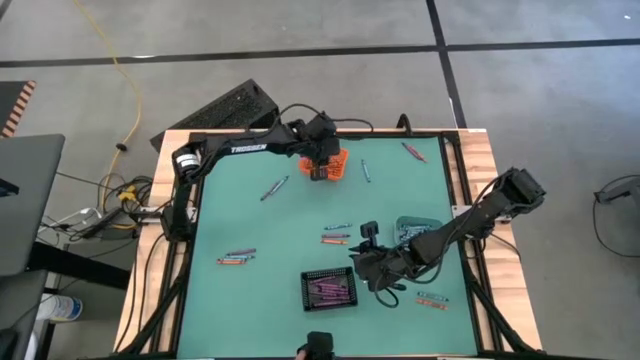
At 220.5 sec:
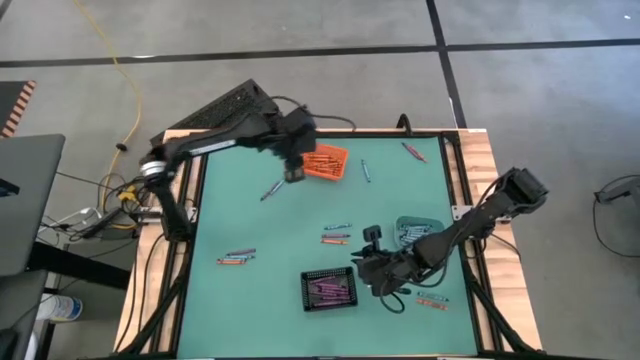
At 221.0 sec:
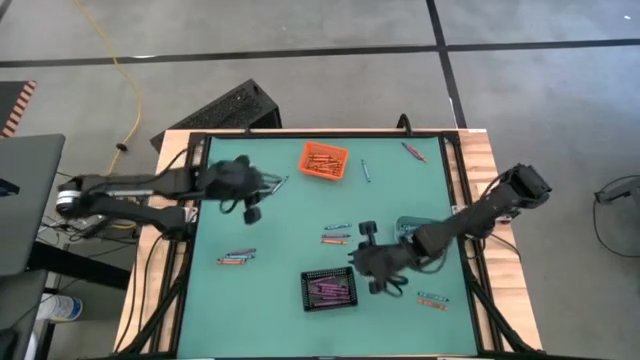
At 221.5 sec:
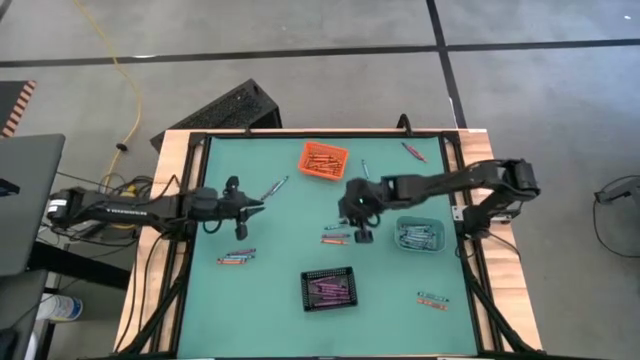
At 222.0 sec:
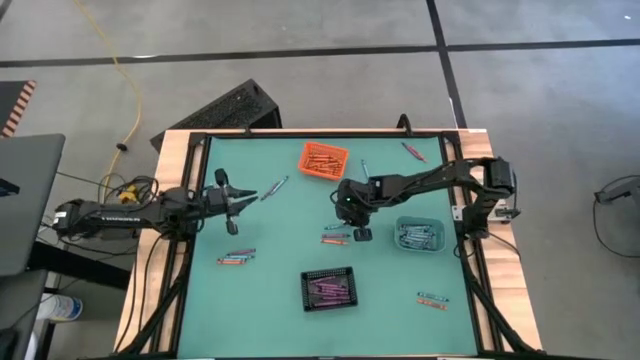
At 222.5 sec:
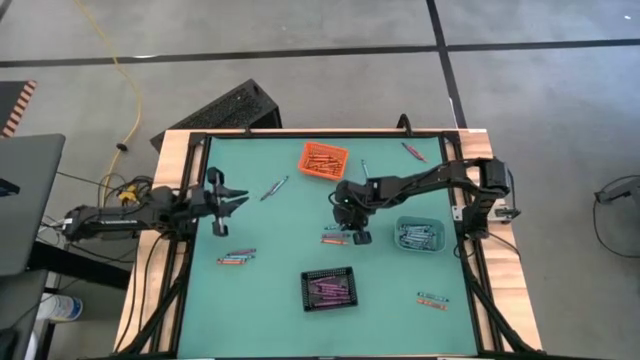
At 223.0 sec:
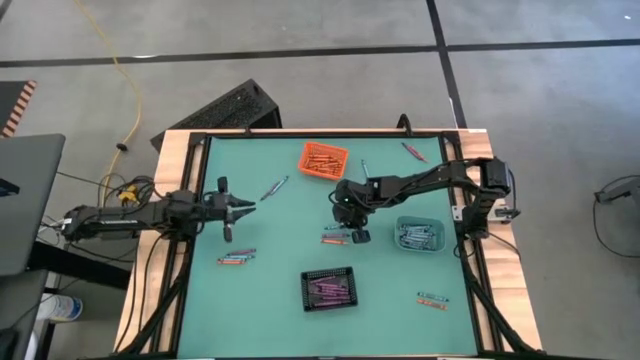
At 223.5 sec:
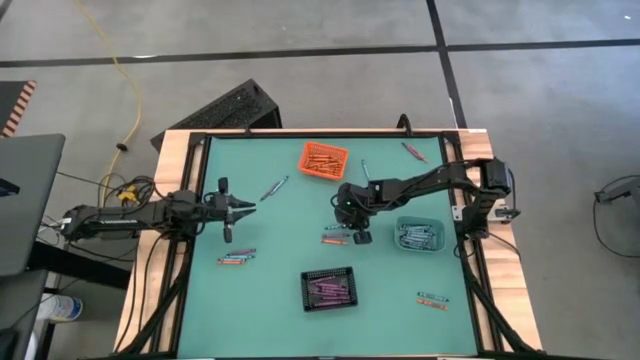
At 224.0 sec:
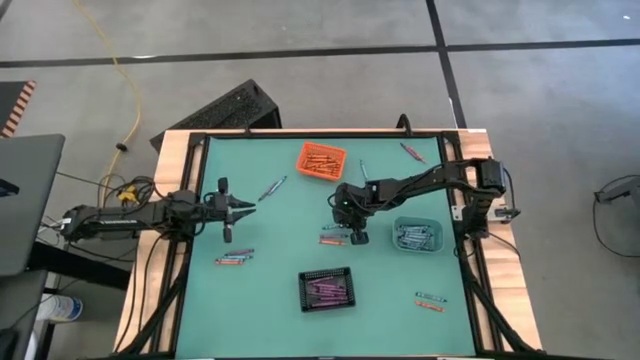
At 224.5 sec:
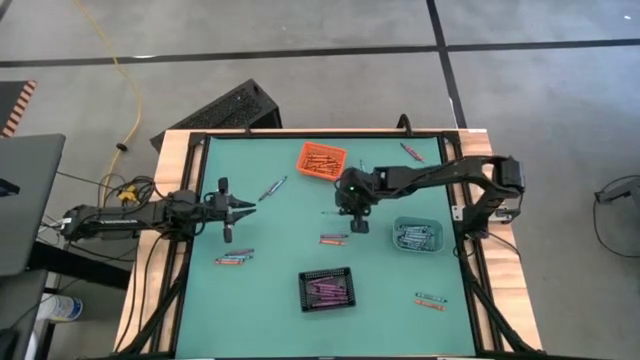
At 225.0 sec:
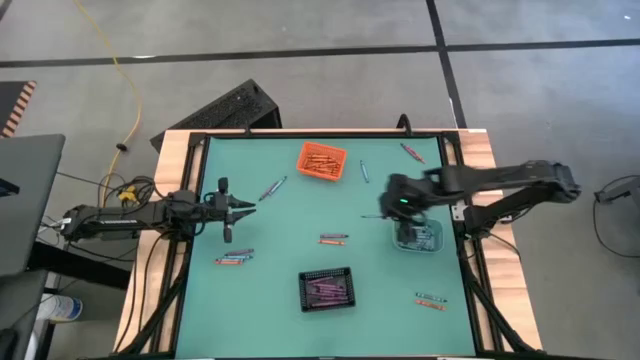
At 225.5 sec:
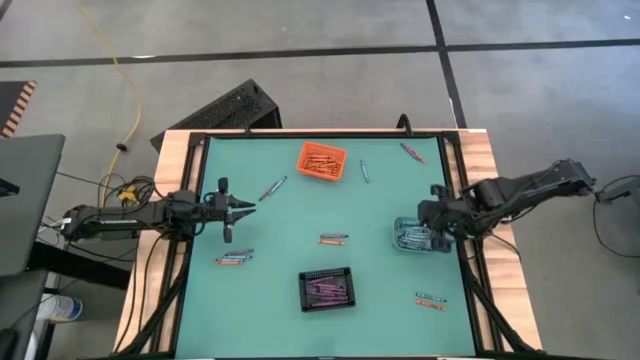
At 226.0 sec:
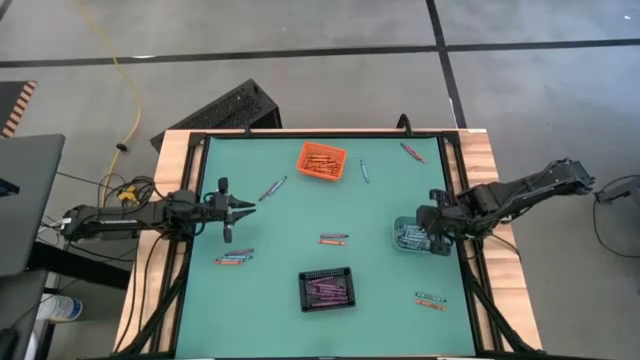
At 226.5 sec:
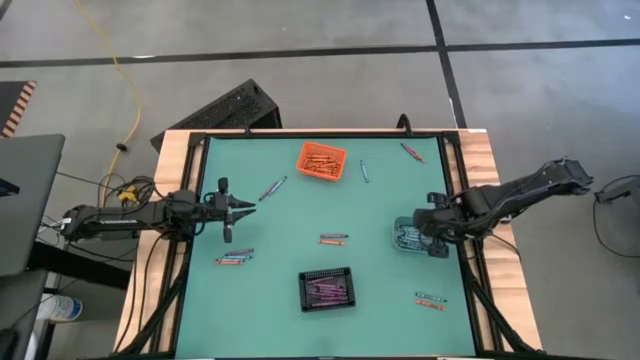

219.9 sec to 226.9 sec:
Task: Sort crayons
Put the blue crayon into the blue bin

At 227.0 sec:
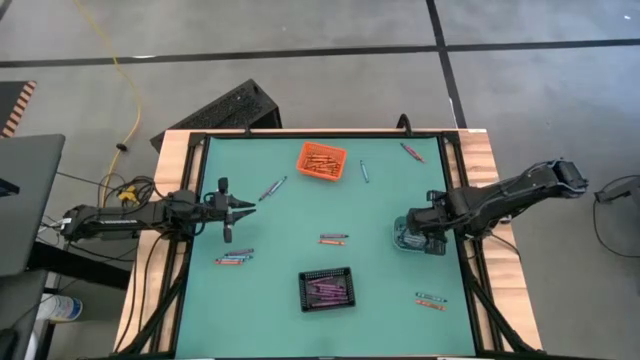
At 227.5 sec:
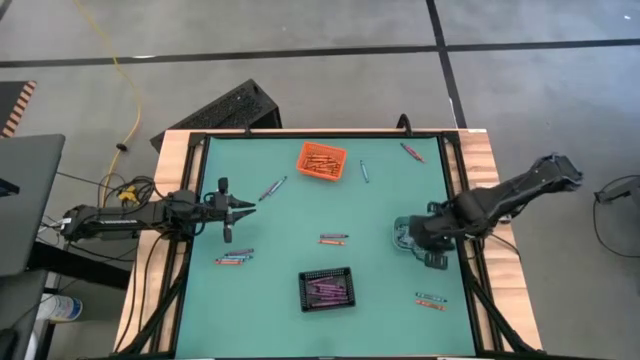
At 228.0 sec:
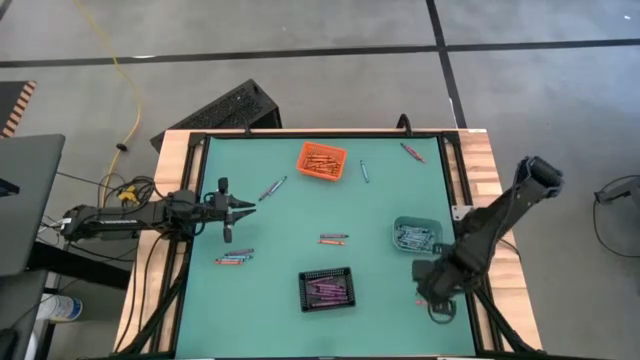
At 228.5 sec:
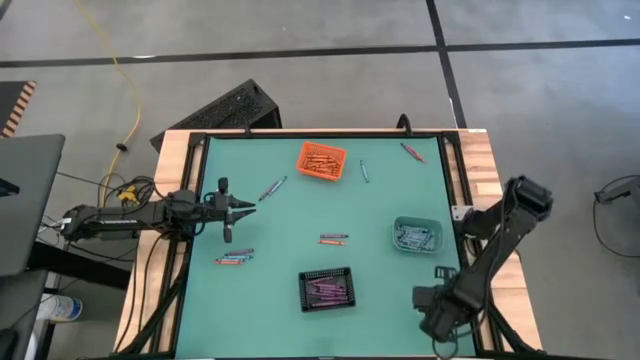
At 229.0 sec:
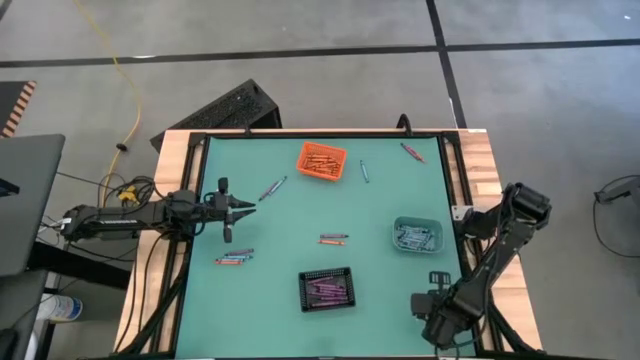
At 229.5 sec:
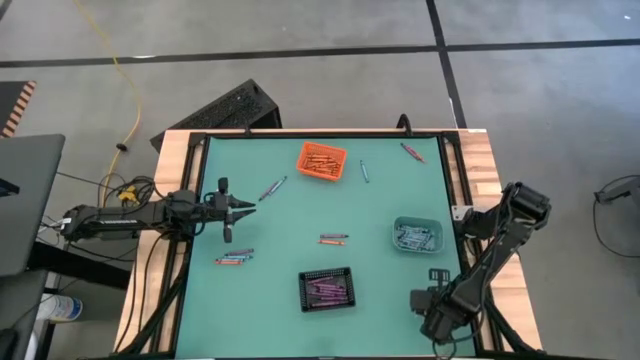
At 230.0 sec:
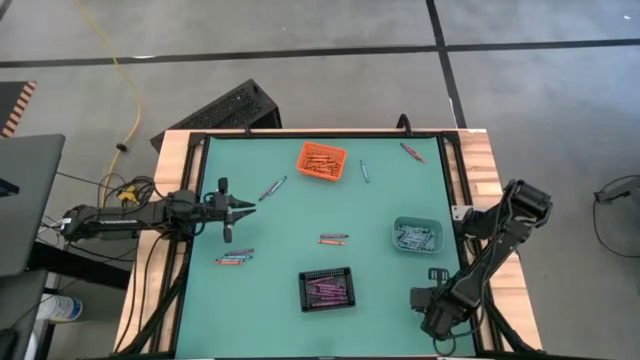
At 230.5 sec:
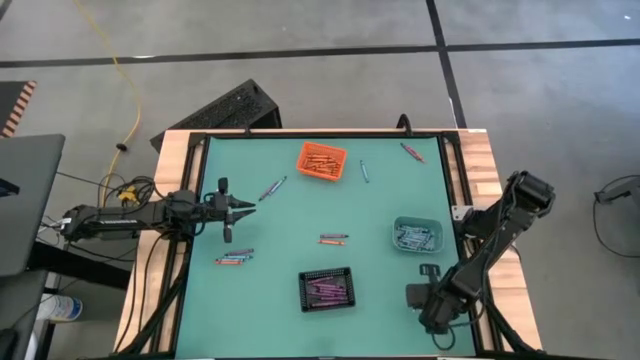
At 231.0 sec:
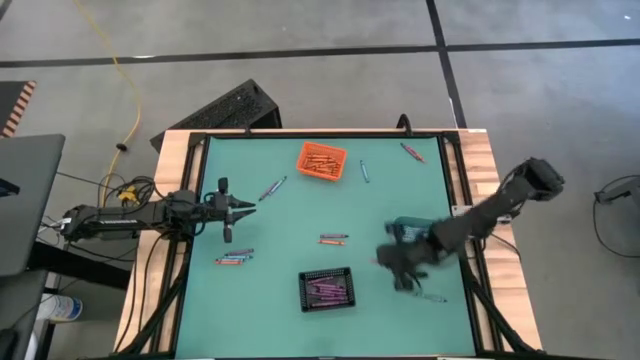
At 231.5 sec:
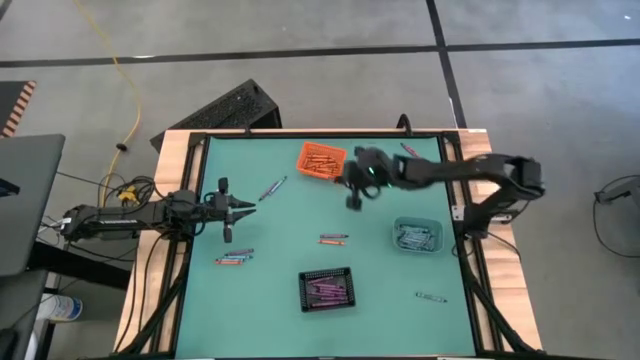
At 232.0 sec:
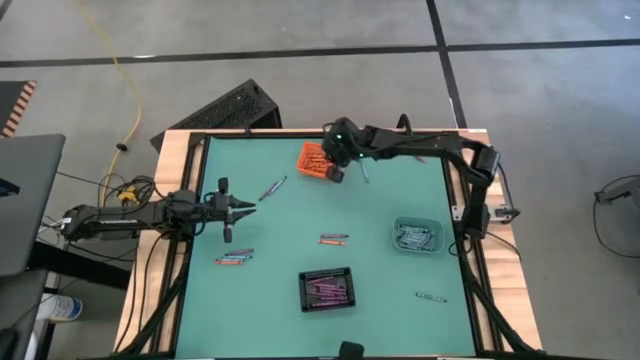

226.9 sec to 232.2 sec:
Put the orange crayon into the orange bin

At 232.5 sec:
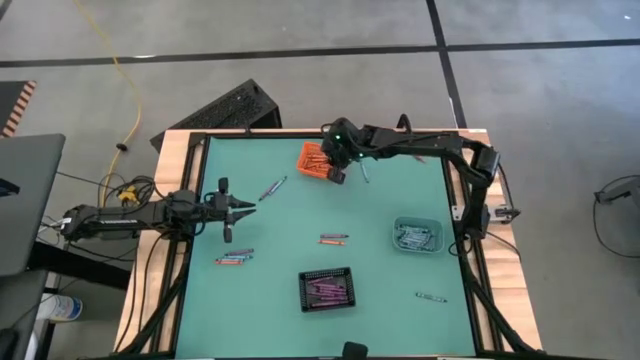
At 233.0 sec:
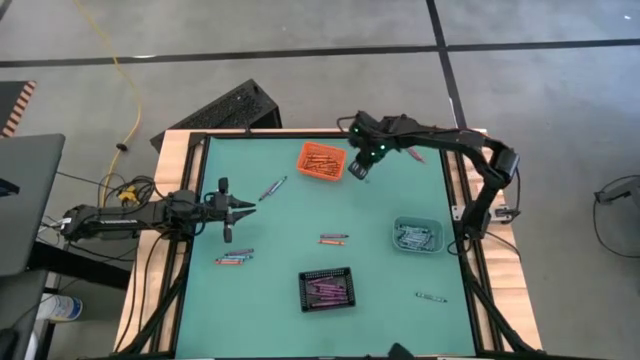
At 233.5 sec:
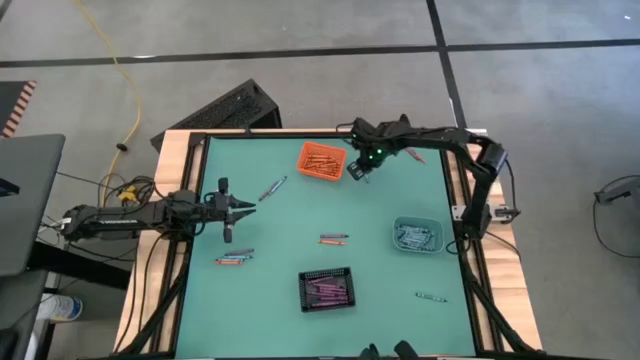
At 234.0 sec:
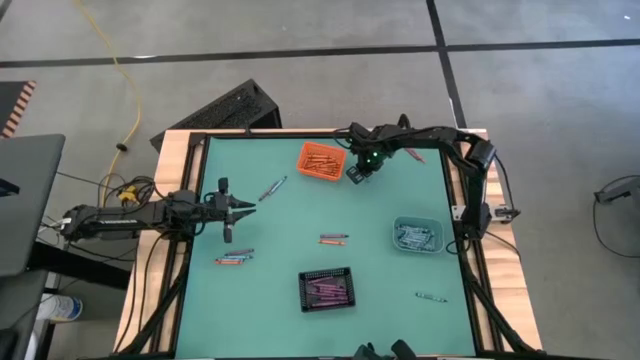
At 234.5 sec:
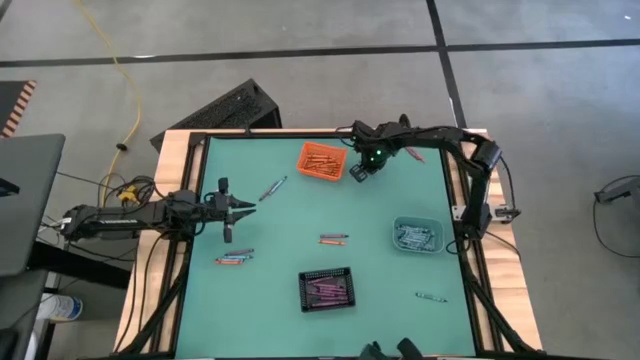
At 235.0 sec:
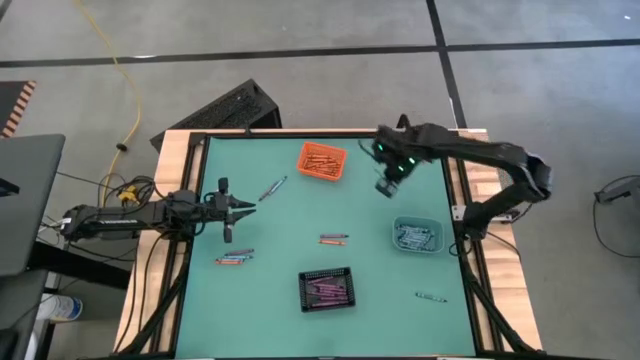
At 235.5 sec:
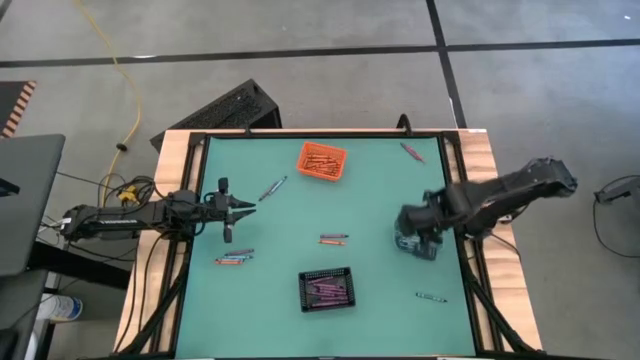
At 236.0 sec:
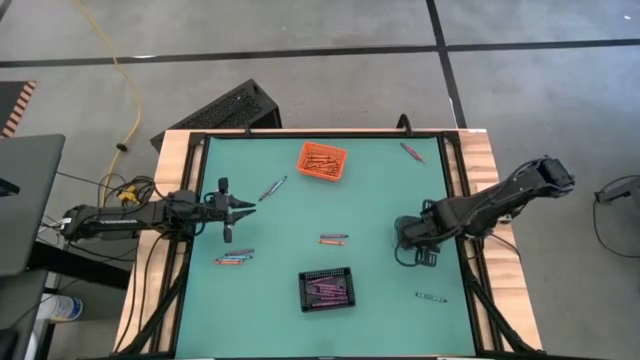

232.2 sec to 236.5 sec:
Put the blue crayon into the blue bin

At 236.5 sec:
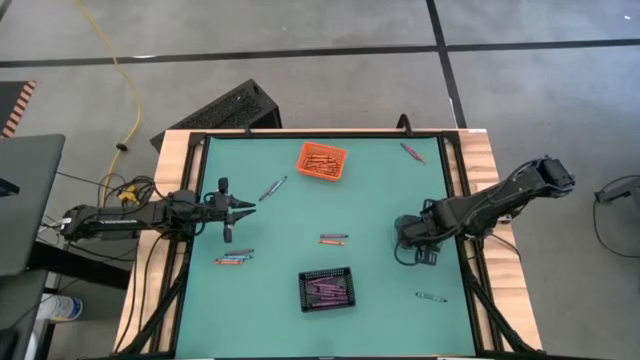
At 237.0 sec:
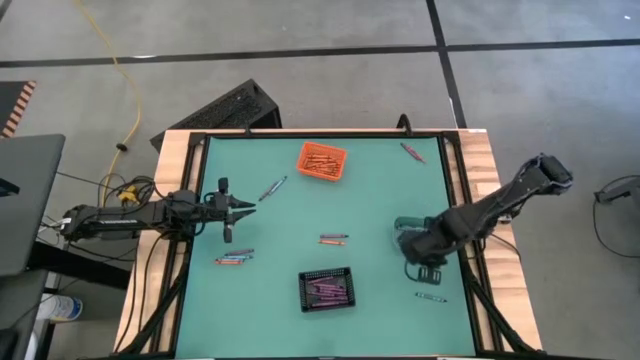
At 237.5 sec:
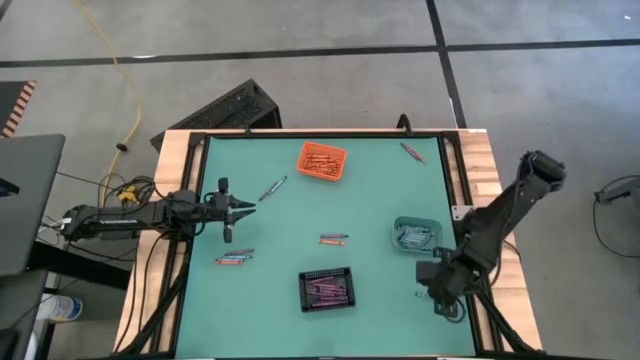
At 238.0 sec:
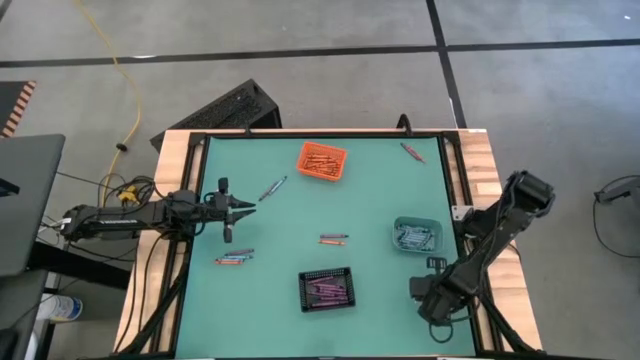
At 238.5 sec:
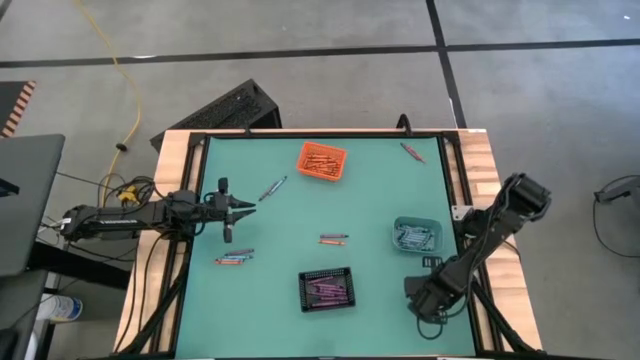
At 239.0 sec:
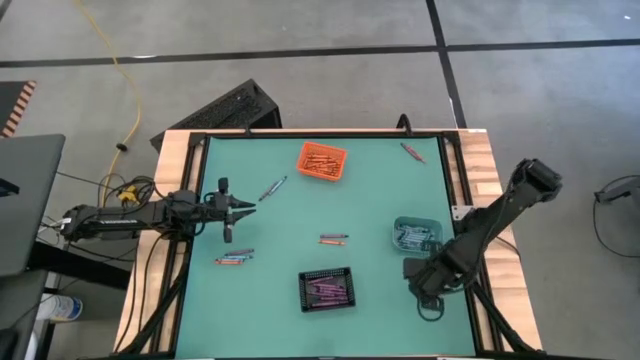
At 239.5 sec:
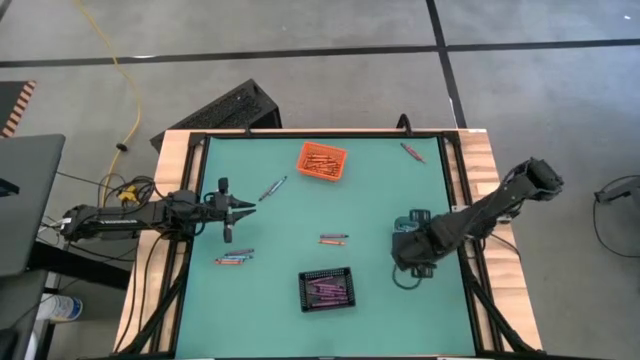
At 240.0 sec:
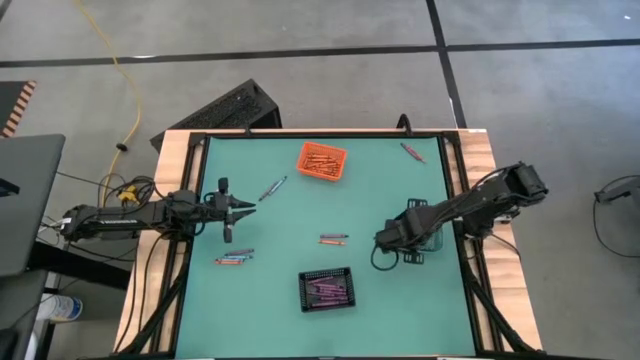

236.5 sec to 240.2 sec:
Put the blue crayon into the blue bin
